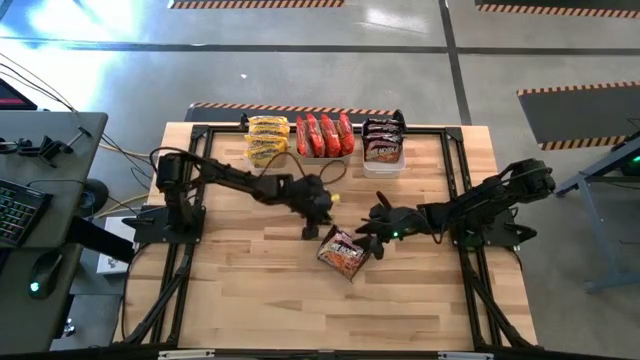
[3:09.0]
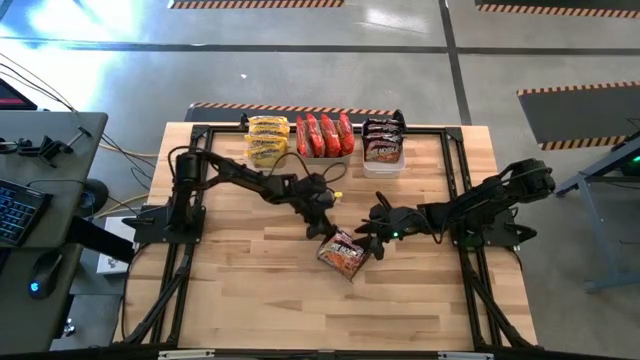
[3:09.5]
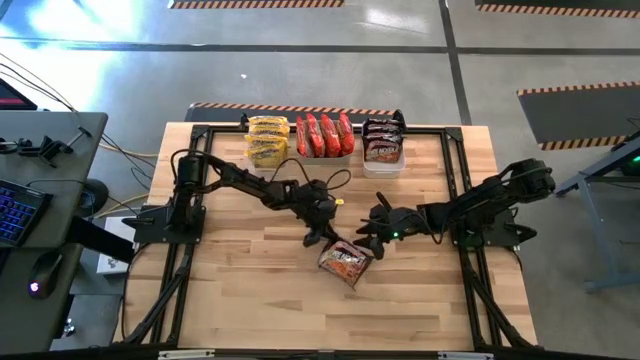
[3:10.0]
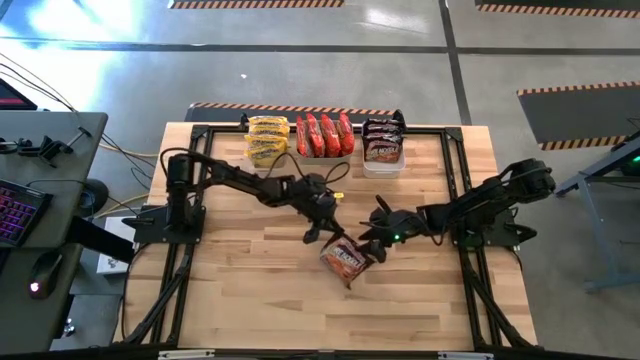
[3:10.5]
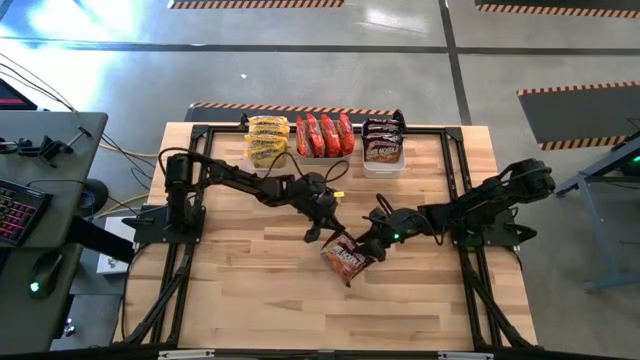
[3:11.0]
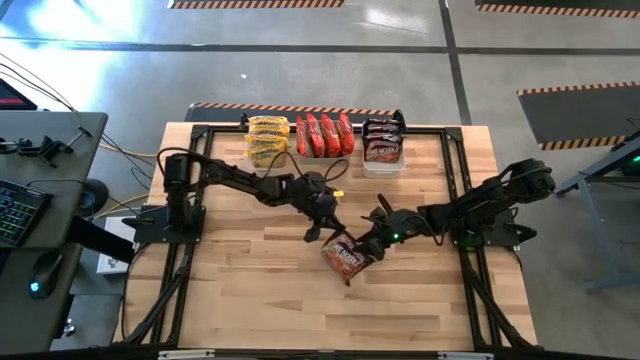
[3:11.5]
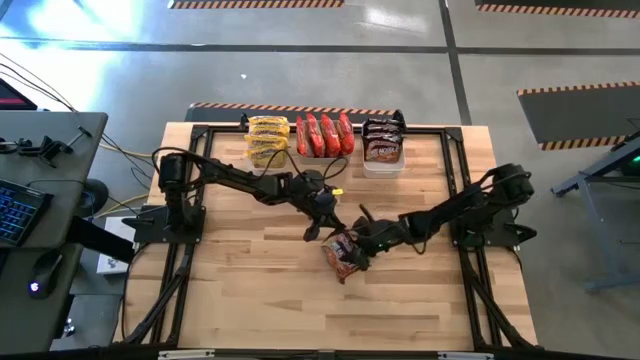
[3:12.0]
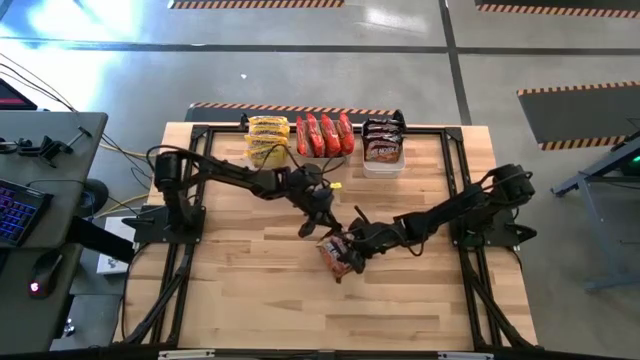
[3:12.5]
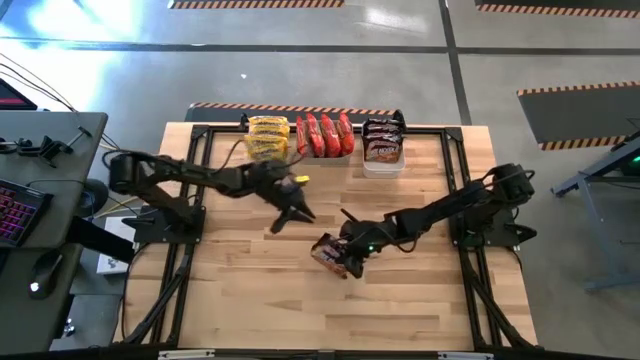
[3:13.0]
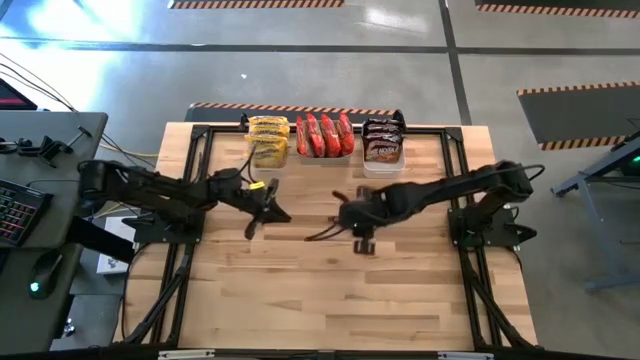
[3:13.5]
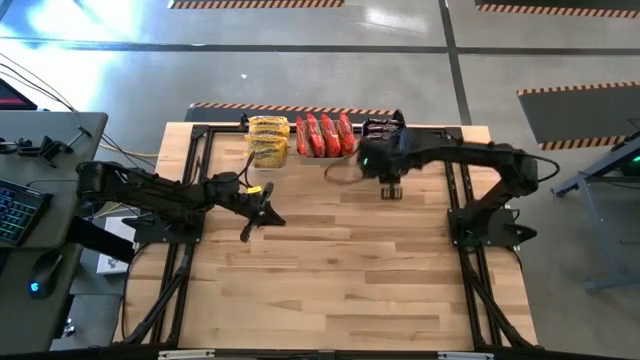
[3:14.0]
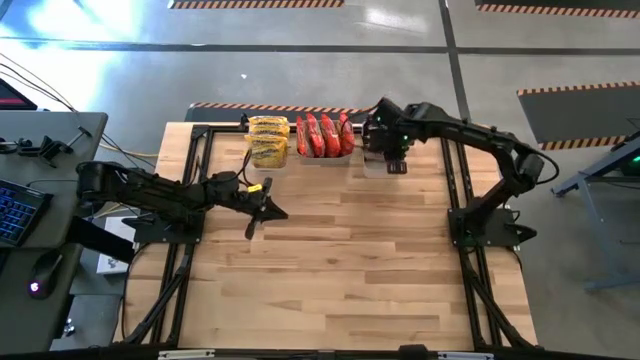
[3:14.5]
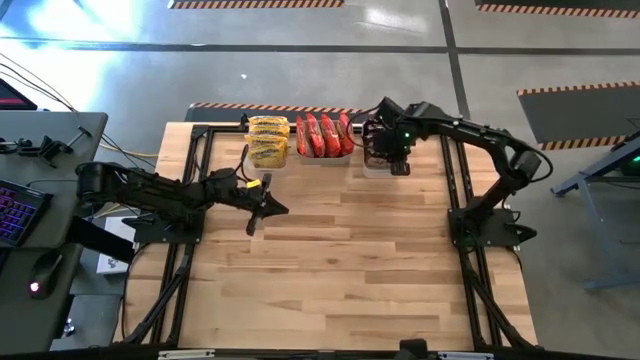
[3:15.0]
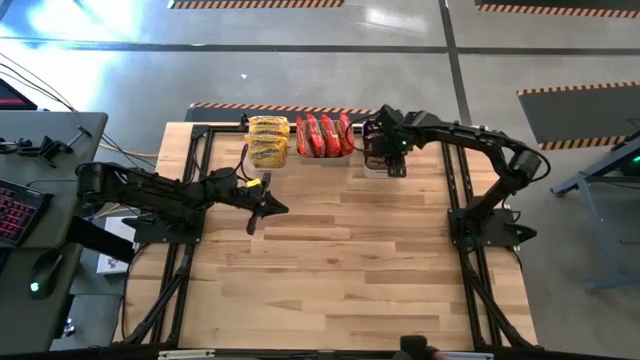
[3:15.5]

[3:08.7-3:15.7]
Task: Sort Maruchan noodles
Put the black noodle pack into the white bin

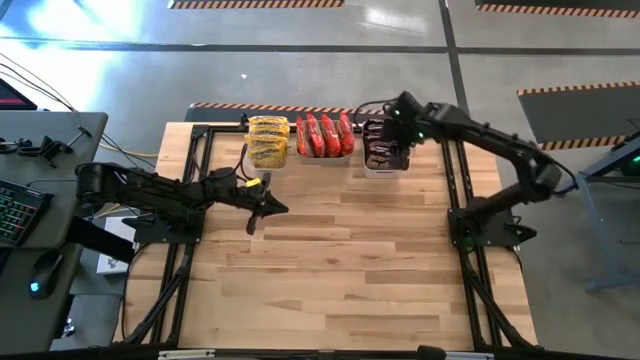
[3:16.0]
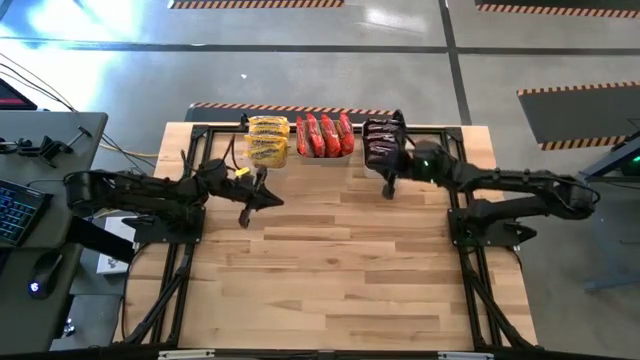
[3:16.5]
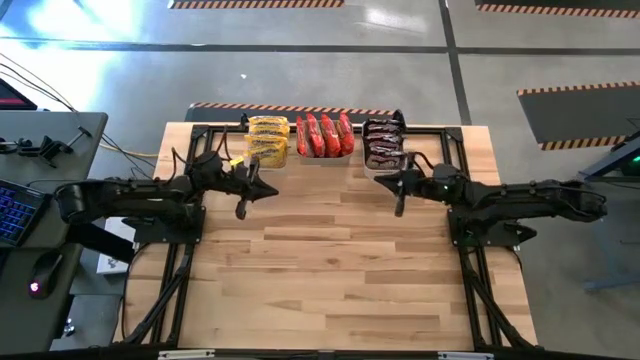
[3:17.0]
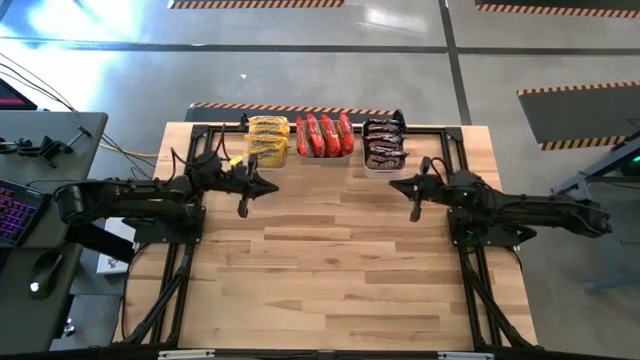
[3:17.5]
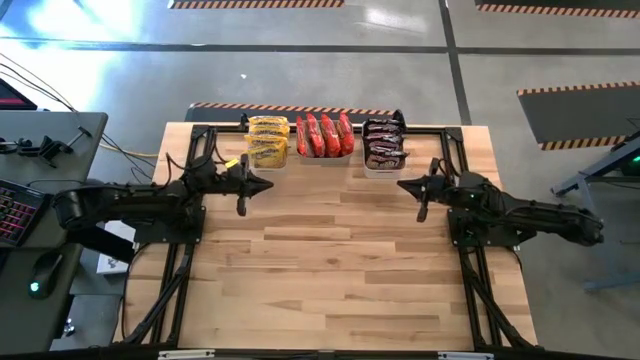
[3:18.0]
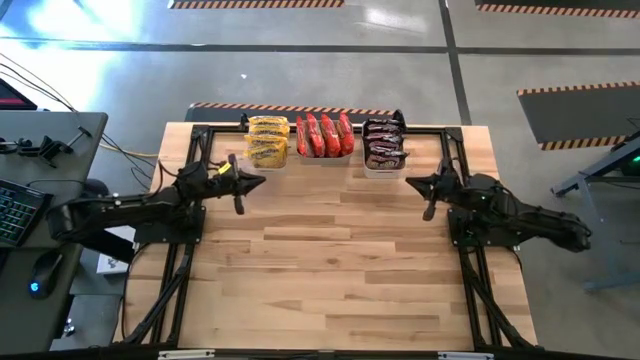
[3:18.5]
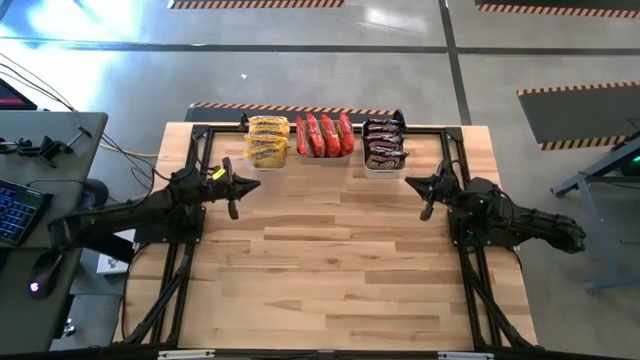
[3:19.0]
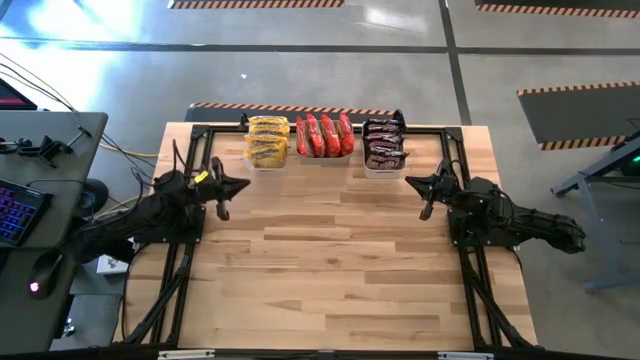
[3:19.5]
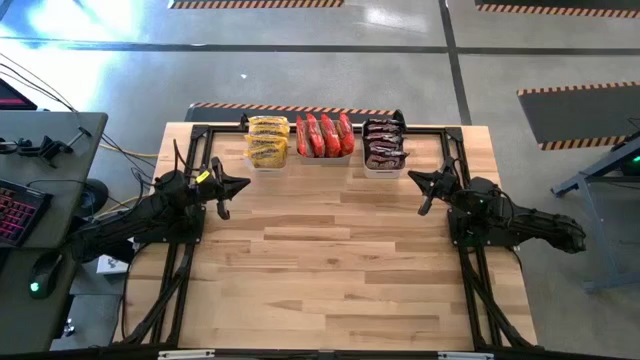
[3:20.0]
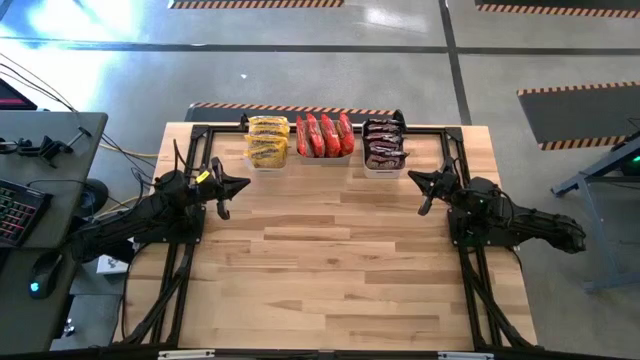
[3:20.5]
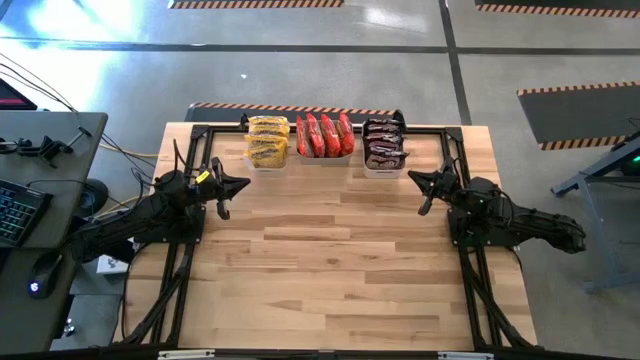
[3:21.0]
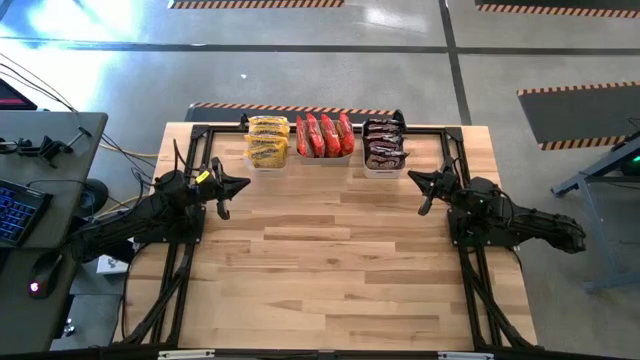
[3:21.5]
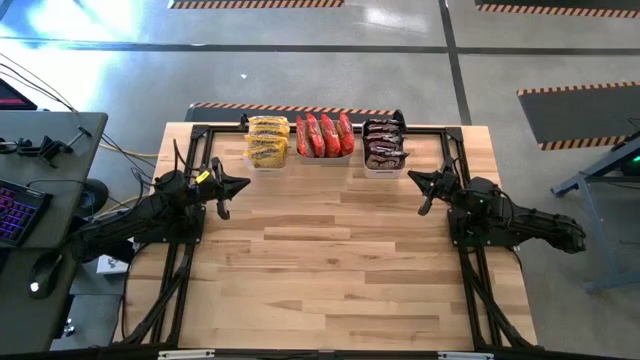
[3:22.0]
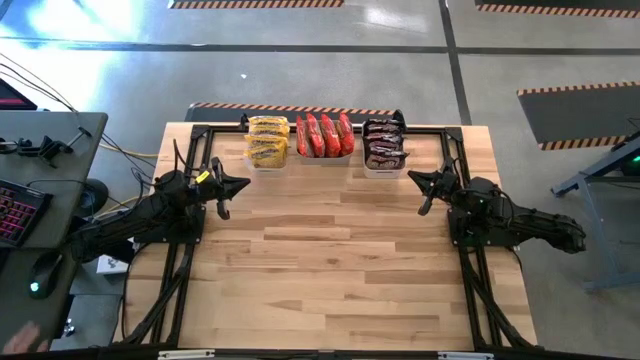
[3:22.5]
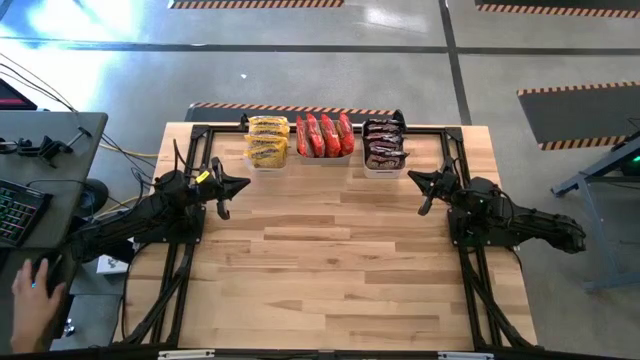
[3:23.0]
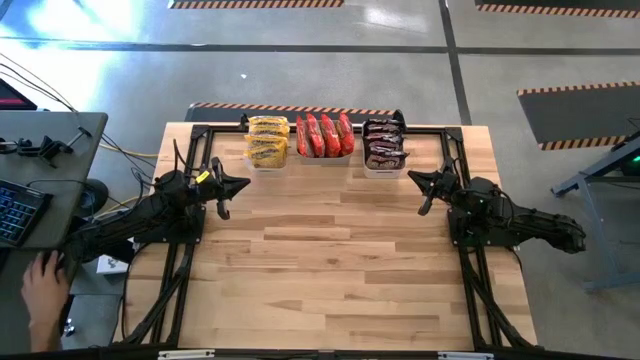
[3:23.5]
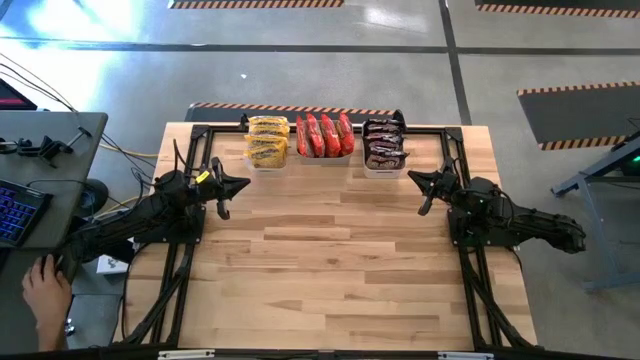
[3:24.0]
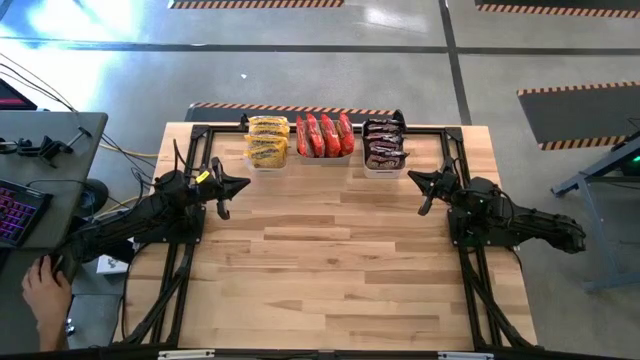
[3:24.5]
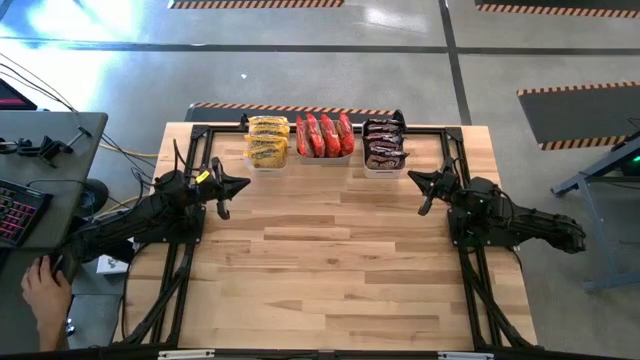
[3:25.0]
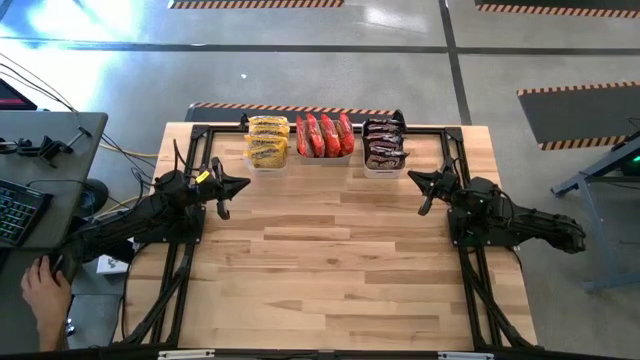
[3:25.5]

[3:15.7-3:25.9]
Return to Home Position

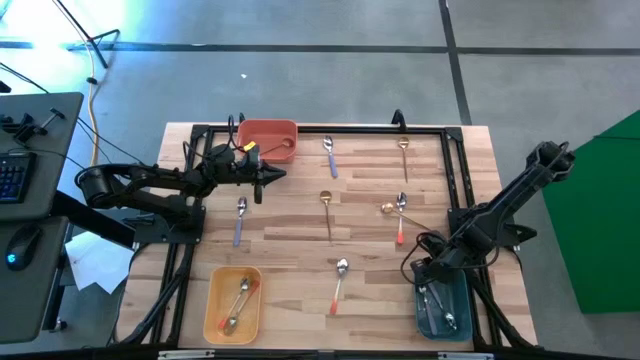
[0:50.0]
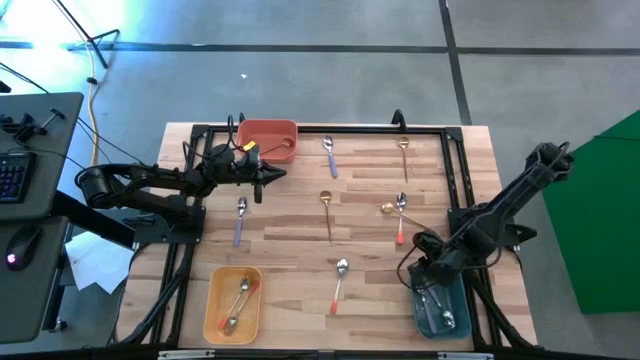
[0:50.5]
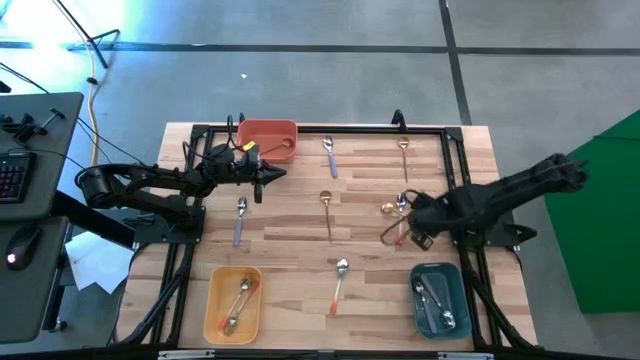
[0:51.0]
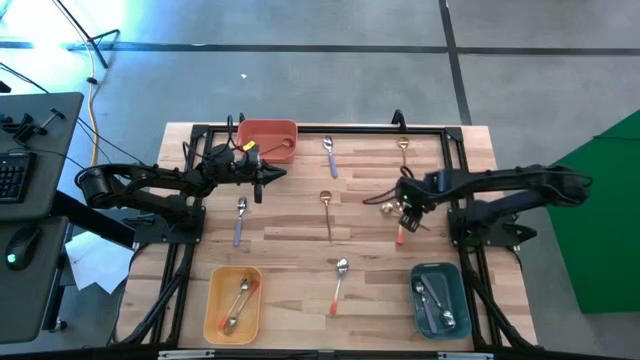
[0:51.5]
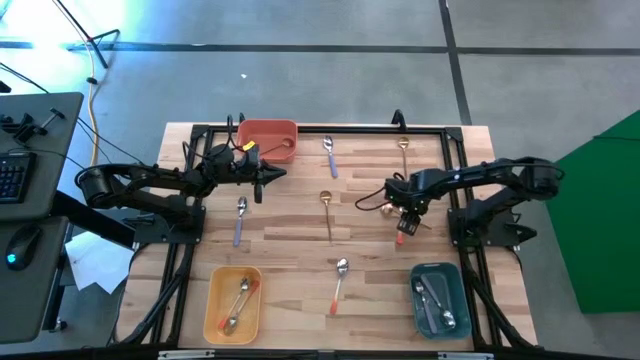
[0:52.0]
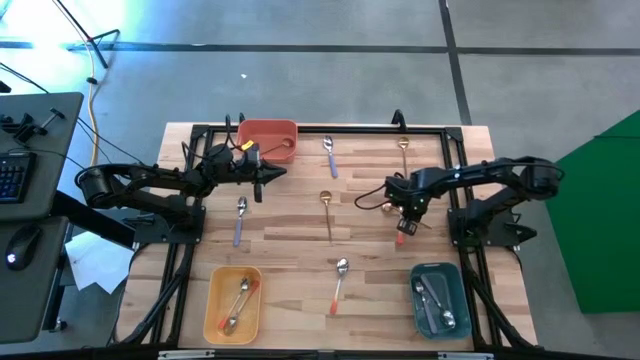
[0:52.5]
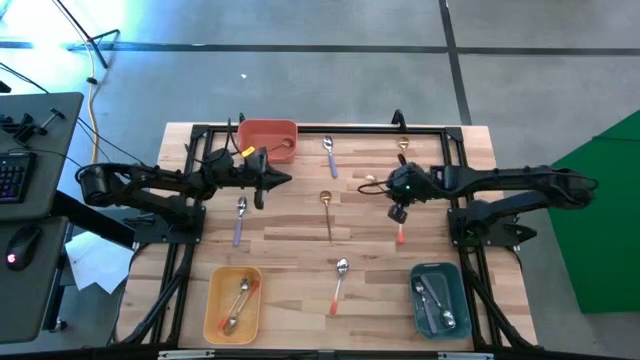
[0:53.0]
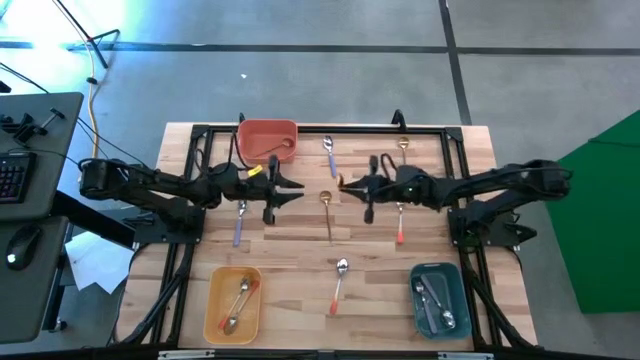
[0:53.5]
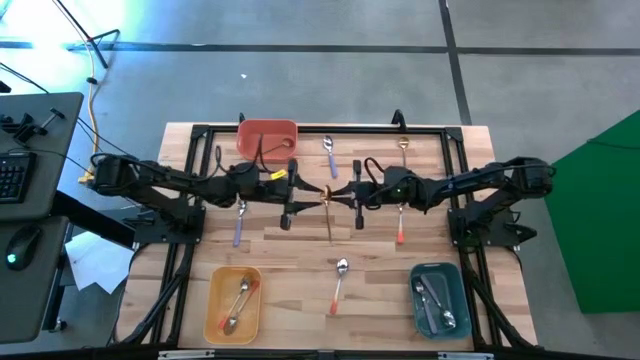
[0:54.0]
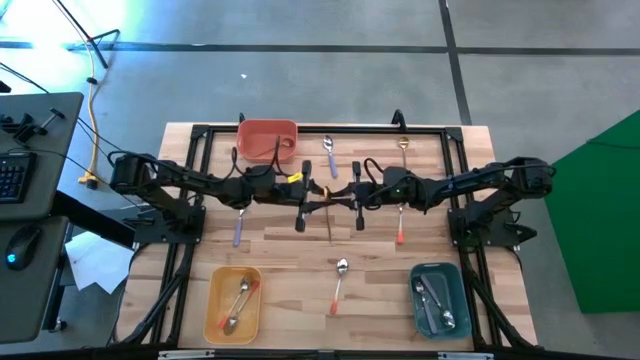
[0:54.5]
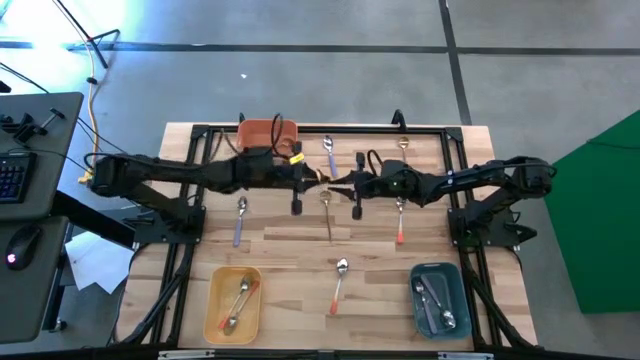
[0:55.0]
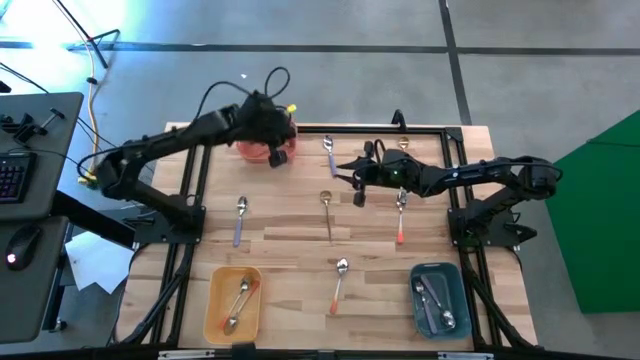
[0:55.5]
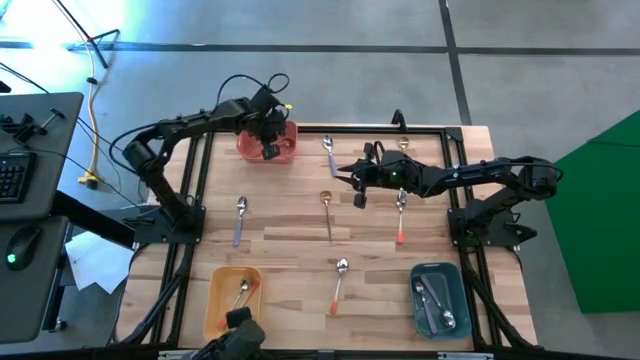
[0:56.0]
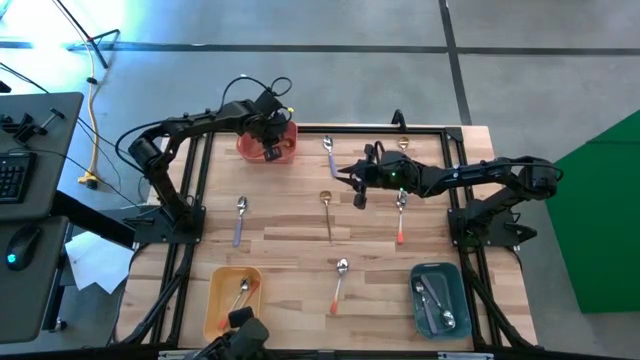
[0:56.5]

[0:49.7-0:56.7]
Task: Sort silverware by color (type)
Put the bottom right gold spoon into the orange bin
